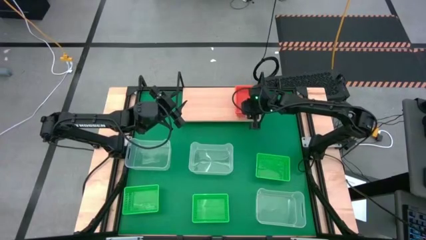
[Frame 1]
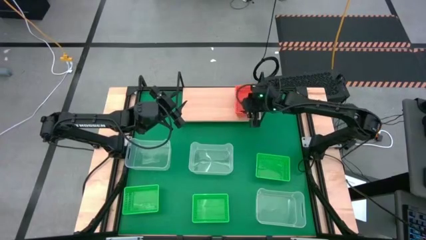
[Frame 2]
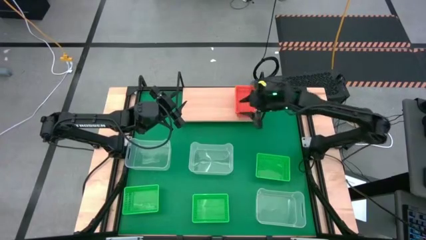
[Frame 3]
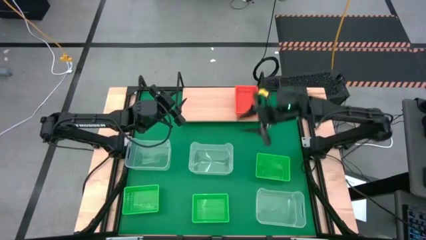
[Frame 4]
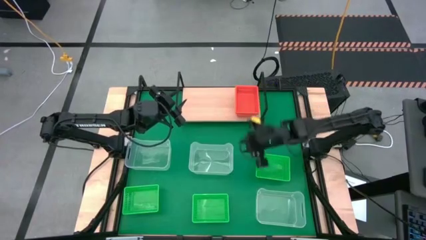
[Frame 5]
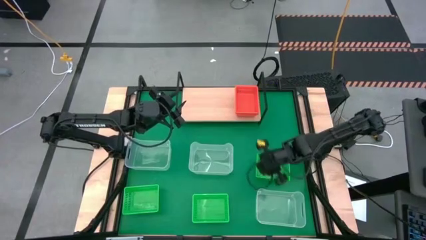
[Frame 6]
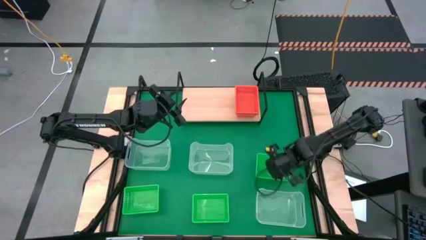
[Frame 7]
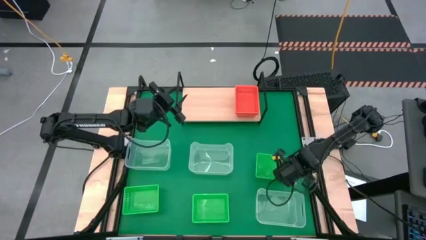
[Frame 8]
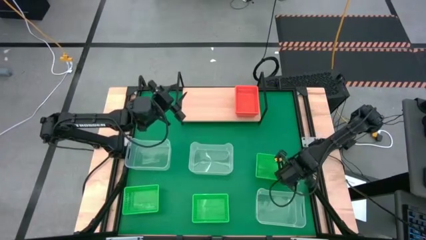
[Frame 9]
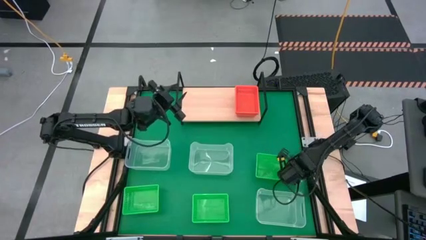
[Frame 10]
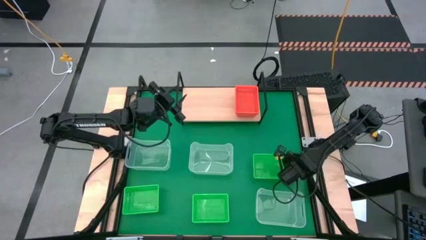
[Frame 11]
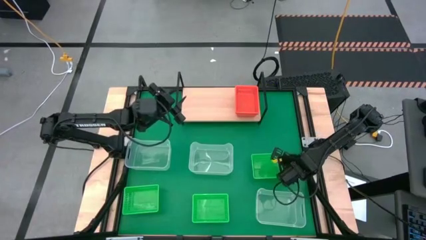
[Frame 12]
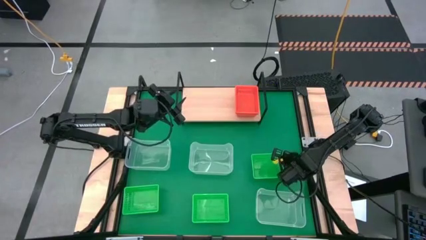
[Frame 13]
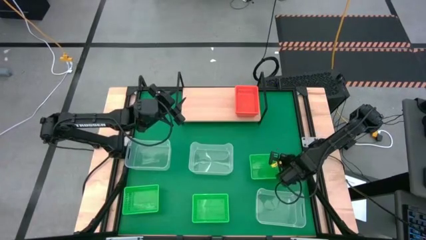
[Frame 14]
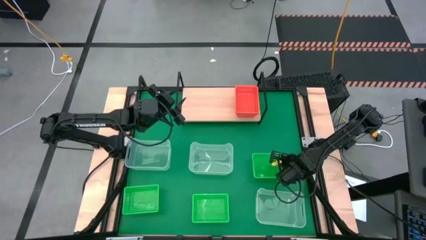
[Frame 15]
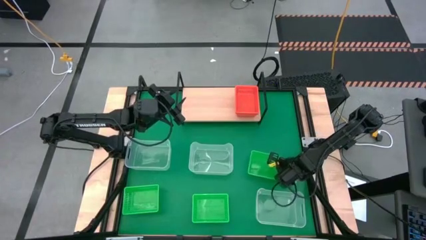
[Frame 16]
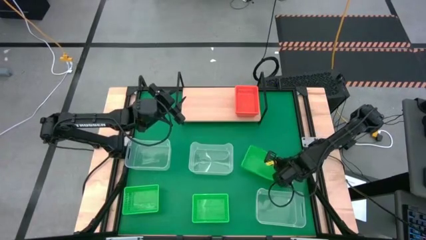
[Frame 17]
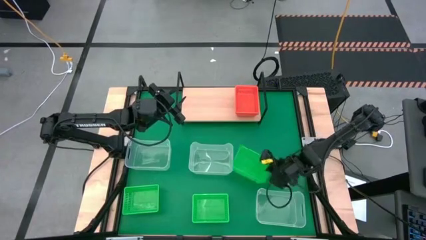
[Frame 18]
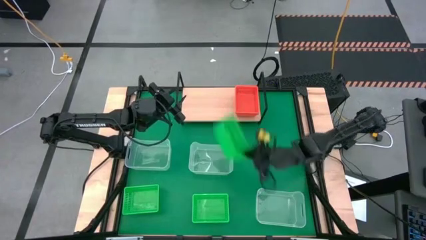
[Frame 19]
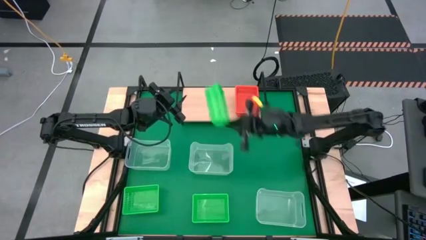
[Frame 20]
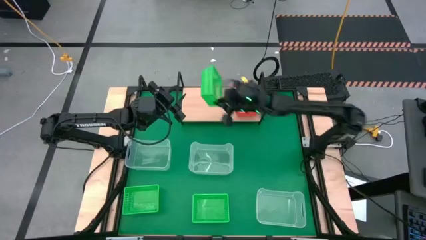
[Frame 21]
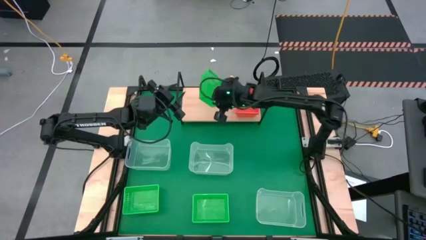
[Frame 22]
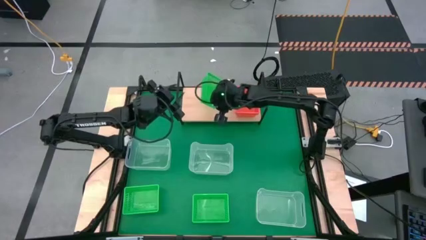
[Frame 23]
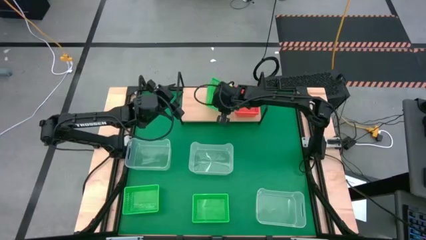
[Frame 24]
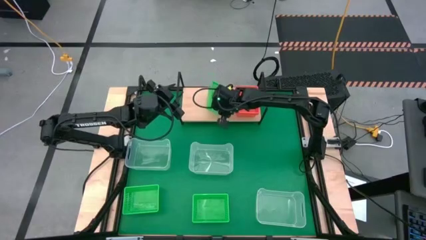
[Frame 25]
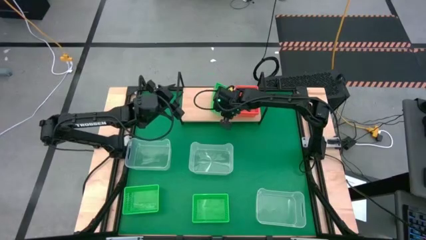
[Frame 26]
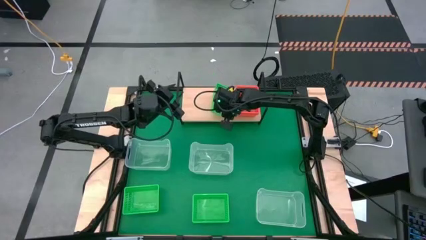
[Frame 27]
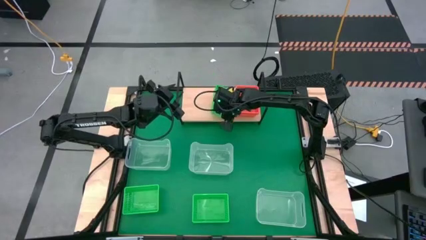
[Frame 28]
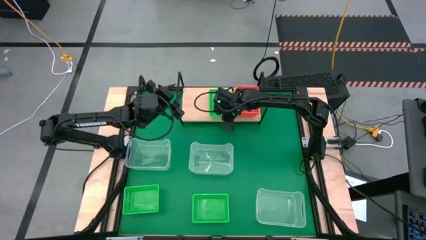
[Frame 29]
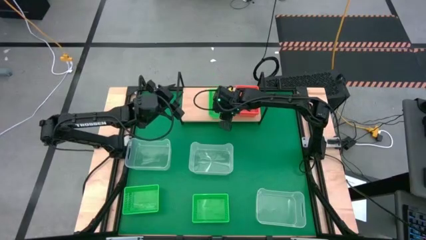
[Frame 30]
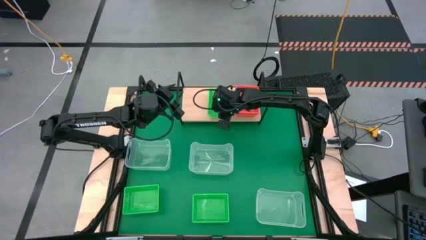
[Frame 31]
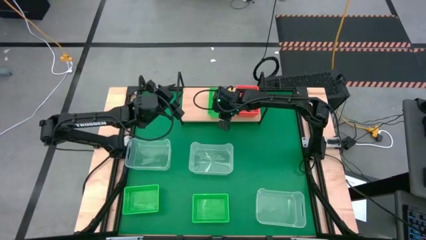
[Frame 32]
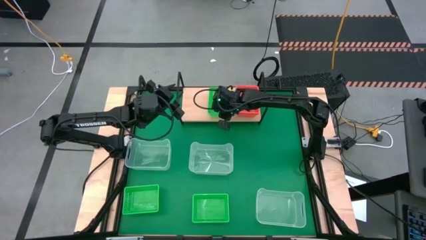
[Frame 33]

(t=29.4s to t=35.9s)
Task: Stack baskets on shelf by color
Put the top right green bin on the shelf

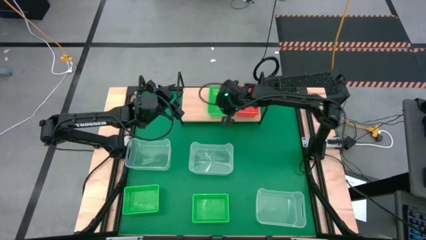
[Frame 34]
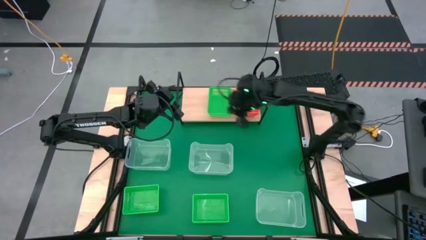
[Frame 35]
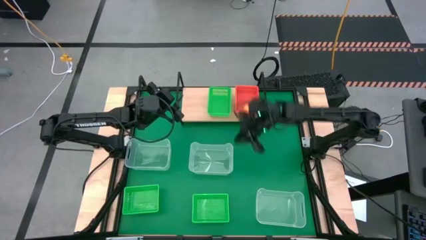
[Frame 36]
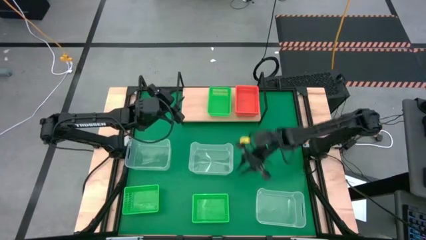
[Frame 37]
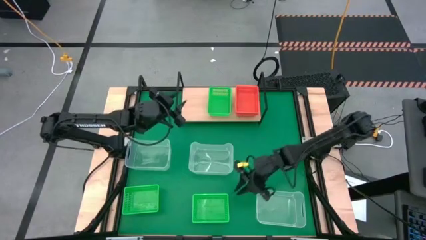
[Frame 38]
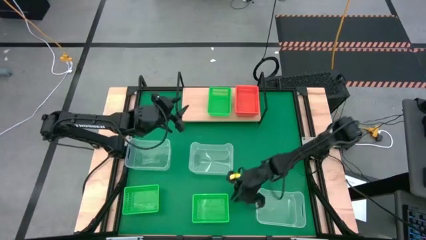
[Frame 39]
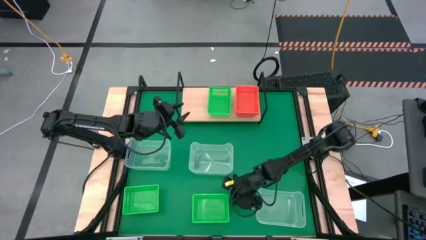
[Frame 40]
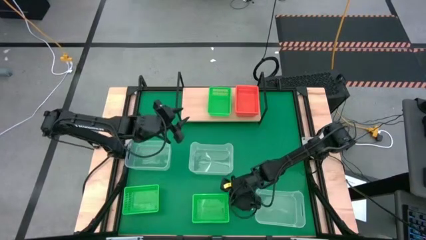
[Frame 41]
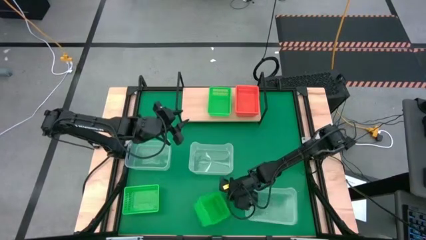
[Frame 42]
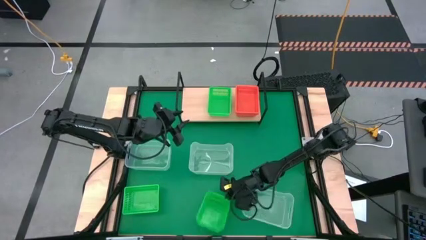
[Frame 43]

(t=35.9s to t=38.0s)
Stack the right green bin on top of the other green bin on the shelf

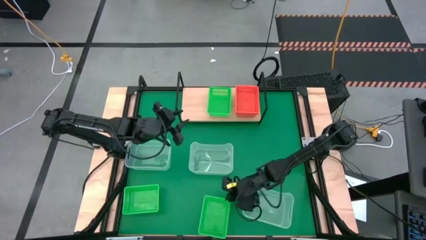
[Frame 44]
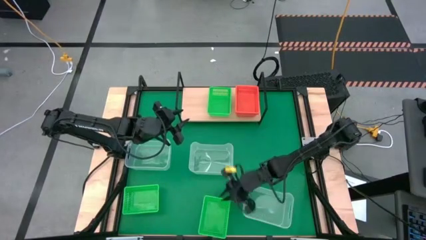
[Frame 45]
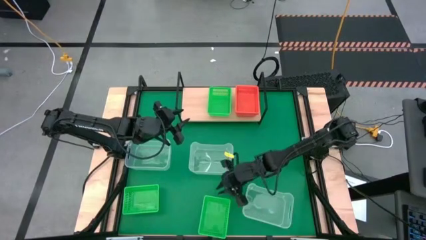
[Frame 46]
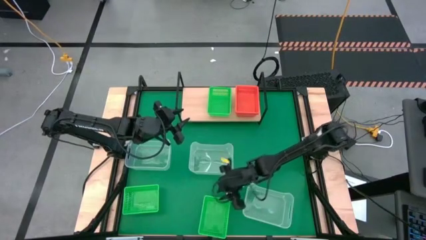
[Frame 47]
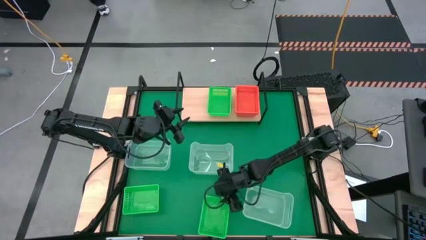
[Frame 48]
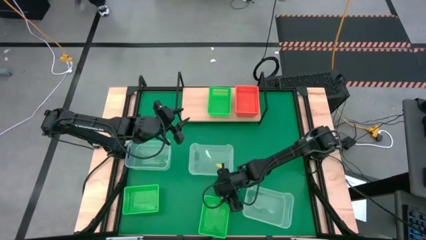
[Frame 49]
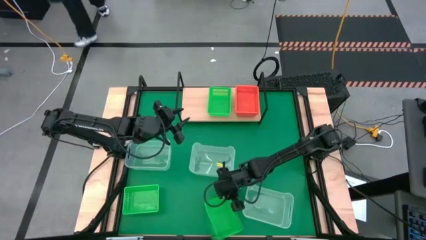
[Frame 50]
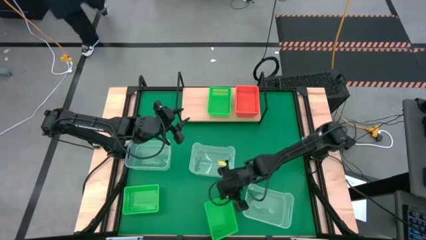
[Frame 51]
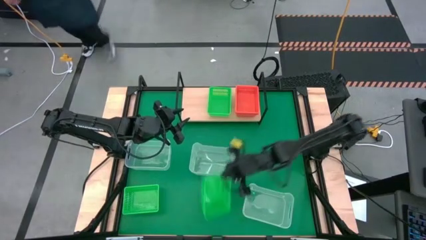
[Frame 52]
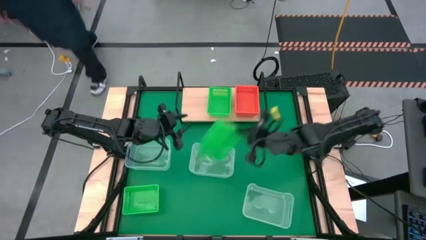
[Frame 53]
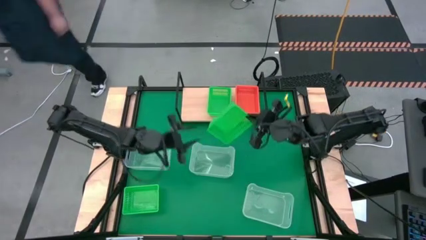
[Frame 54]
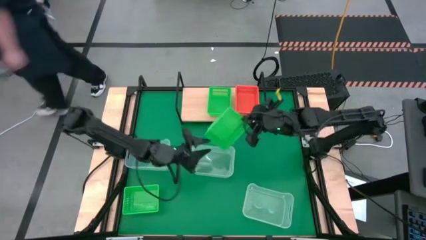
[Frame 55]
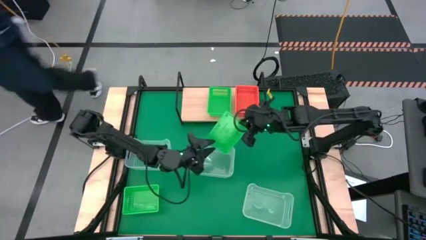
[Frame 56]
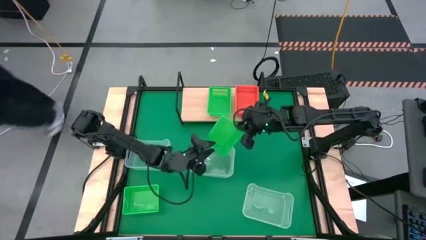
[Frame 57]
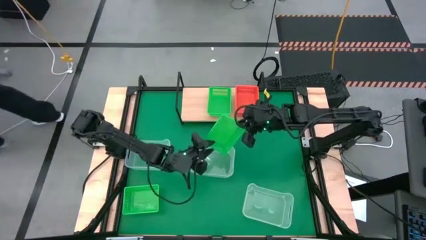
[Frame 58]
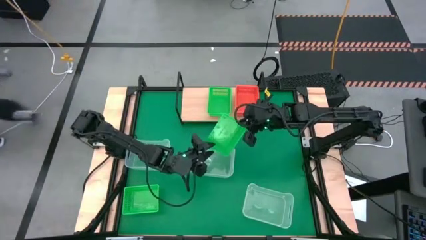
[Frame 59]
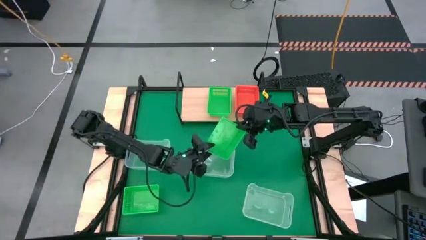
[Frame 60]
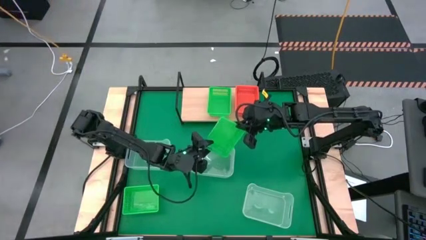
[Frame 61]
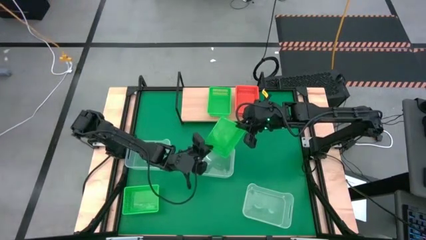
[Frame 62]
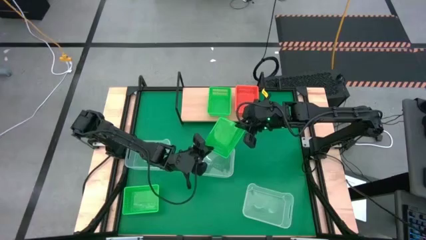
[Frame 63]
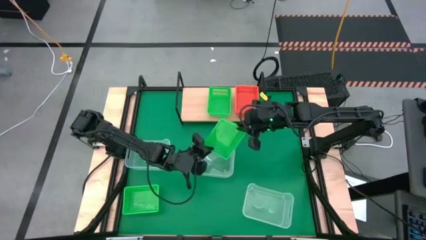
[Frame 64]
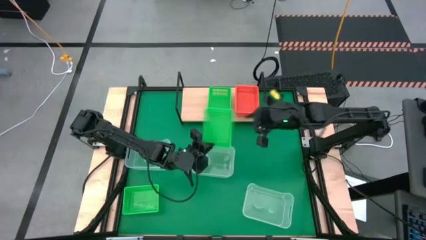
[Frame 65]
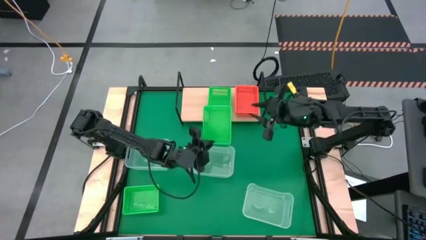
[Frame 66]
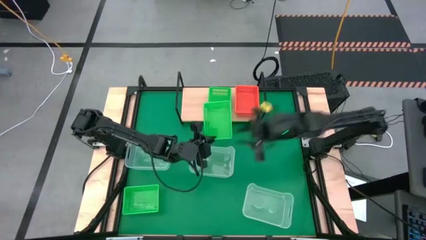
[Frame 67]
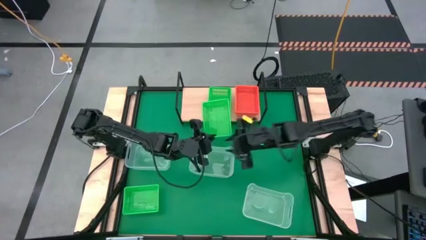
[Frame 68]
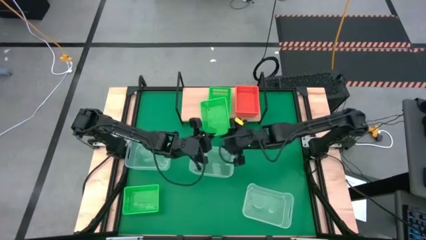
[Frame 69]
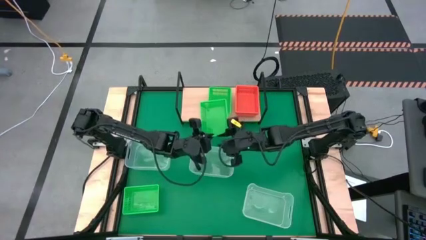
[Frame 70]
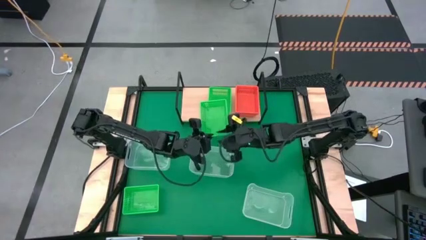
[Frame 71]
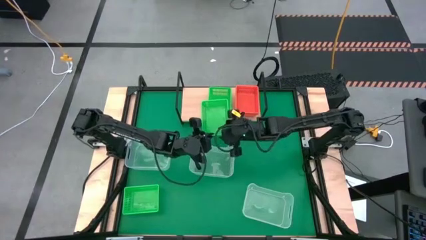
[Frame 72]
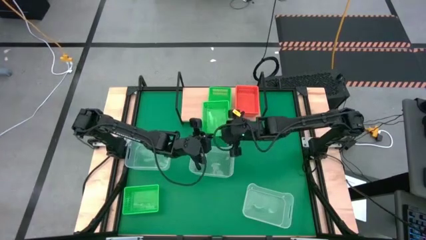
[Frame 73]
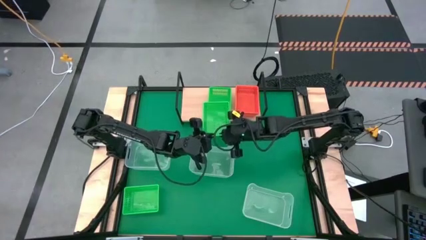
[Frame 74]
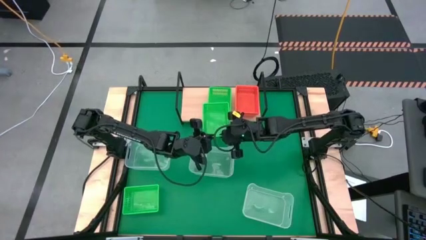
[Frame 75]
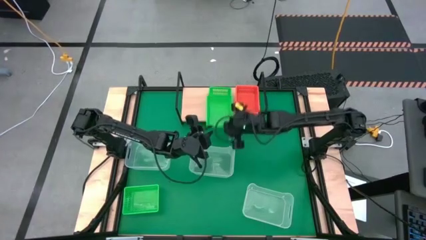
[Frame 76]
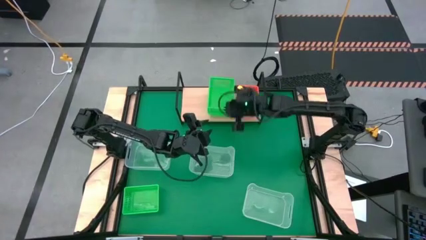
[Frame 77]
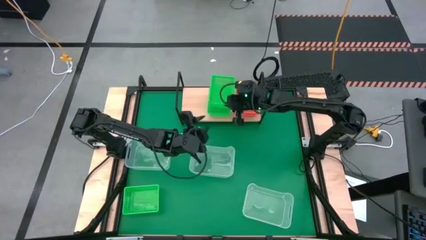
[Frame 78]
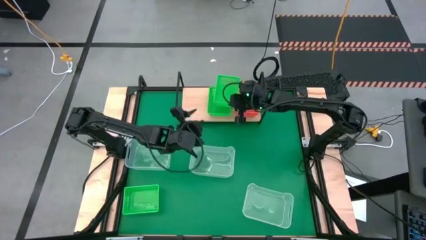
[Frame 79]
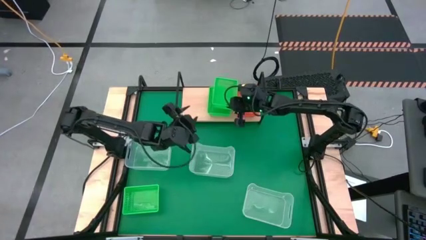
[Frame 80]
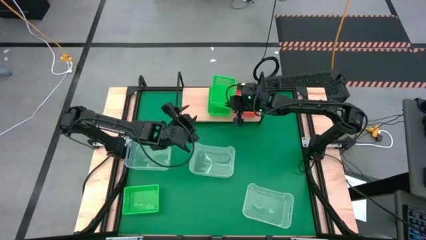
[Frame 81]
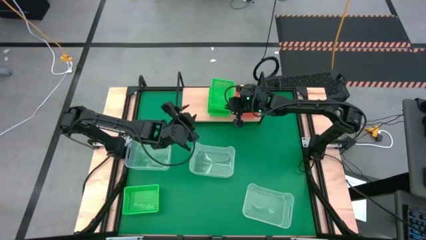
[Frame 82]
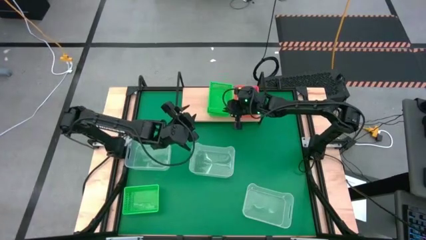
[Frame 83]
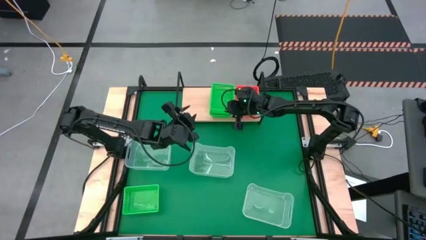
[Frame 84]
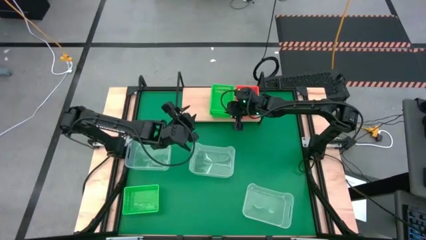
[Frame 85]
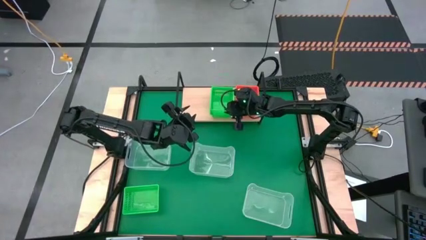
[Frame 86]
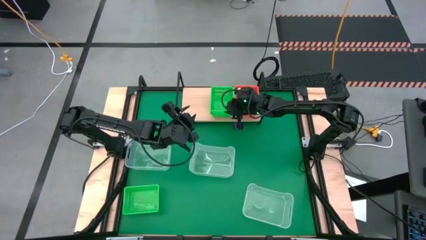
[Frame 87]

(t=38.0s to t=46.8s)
Stack the right green bin on top of the other green bin on the shelf
